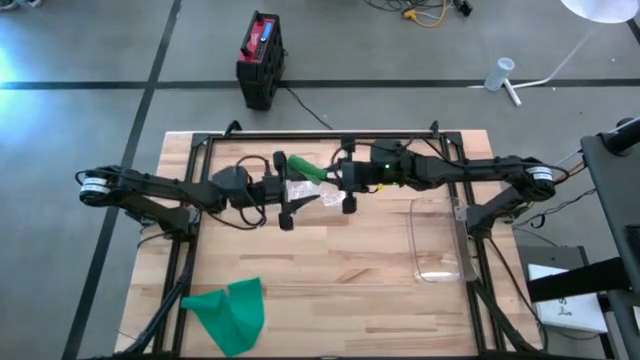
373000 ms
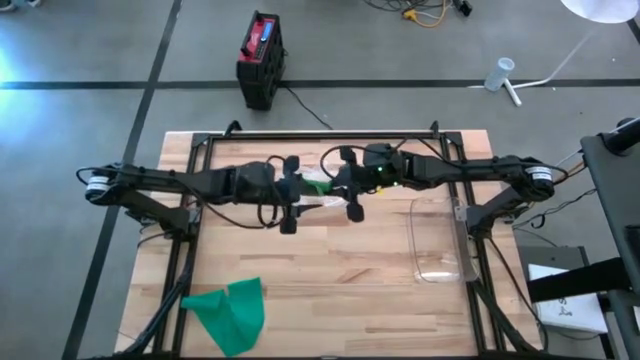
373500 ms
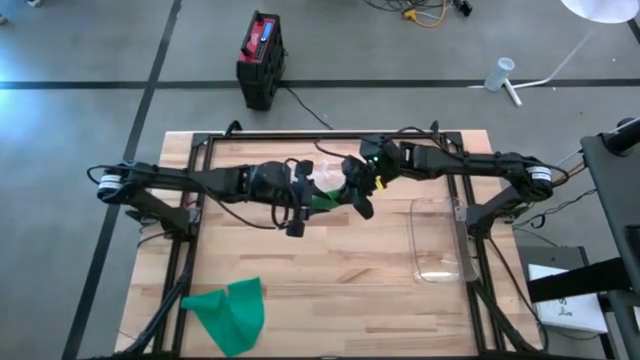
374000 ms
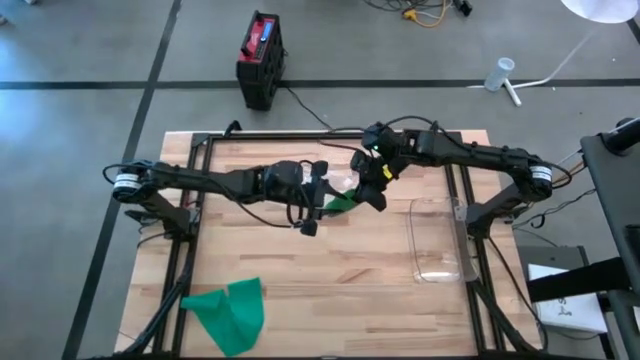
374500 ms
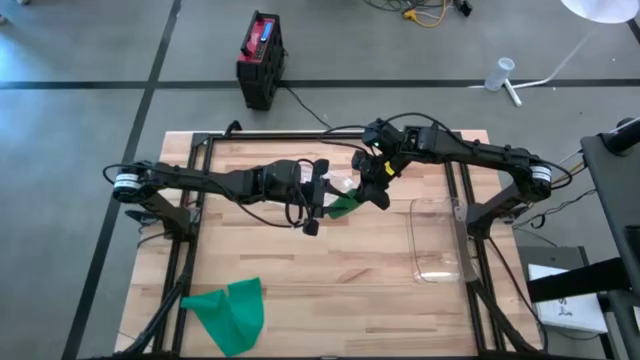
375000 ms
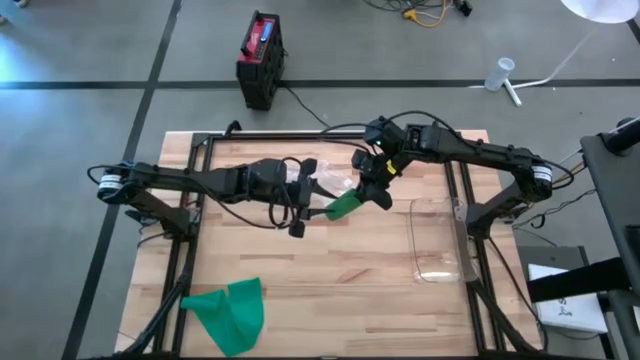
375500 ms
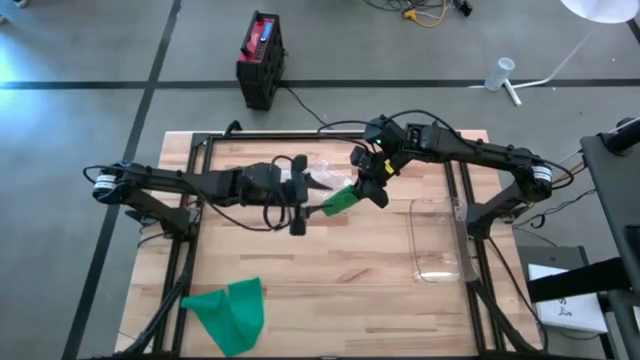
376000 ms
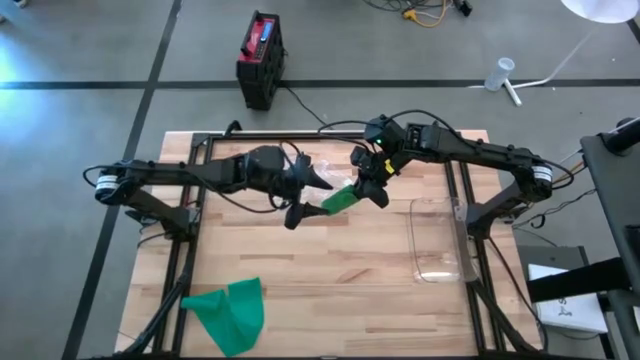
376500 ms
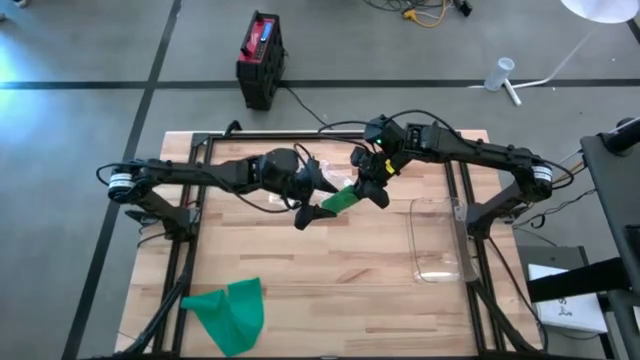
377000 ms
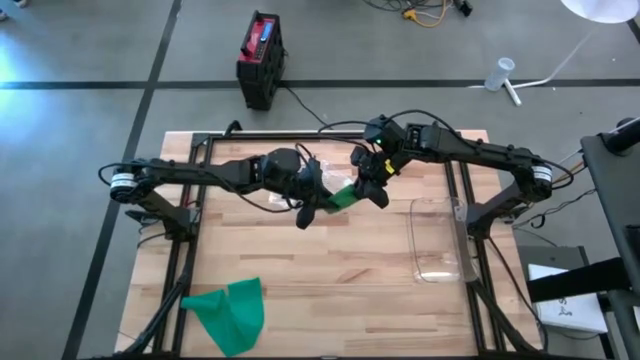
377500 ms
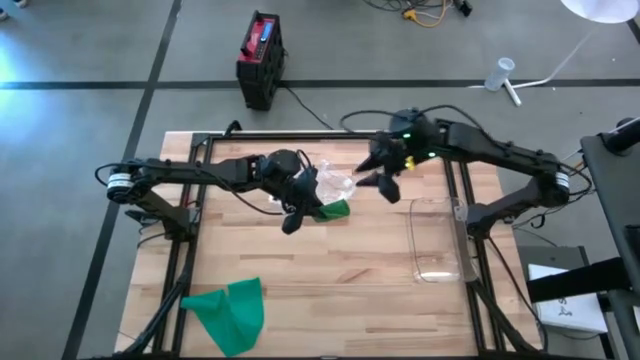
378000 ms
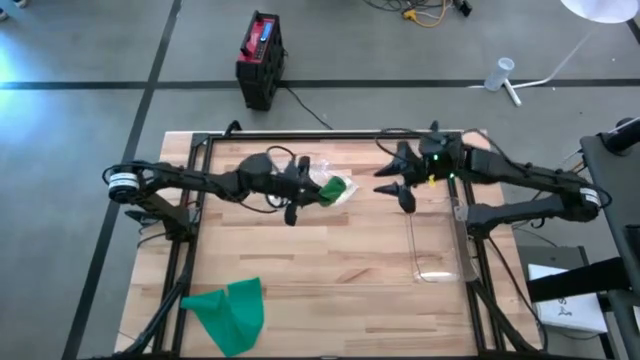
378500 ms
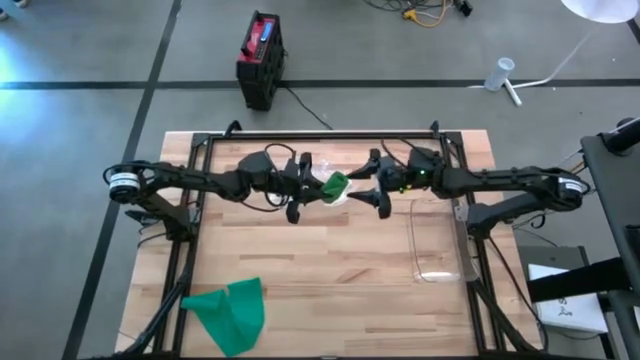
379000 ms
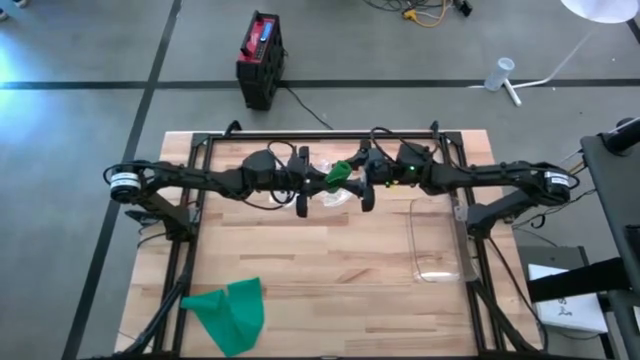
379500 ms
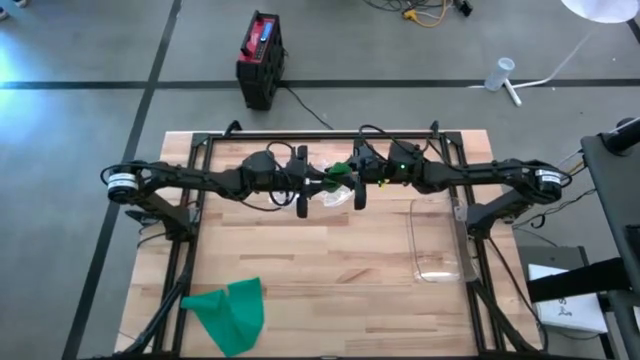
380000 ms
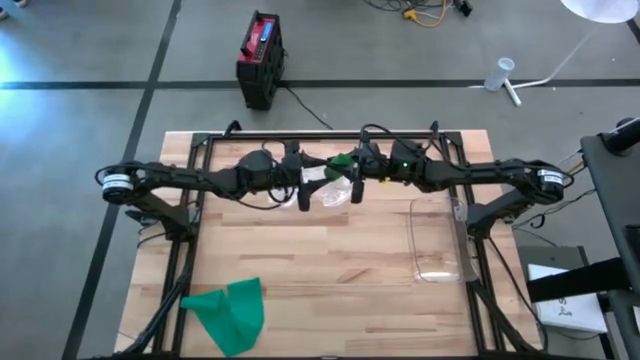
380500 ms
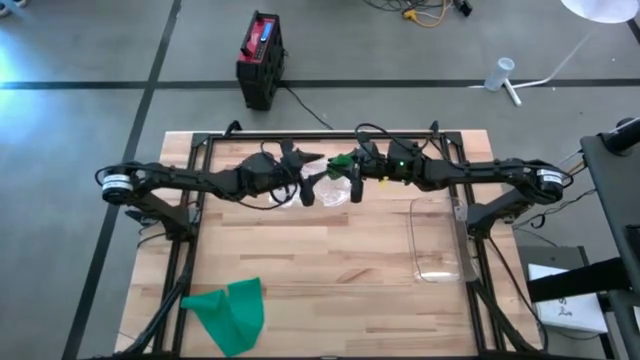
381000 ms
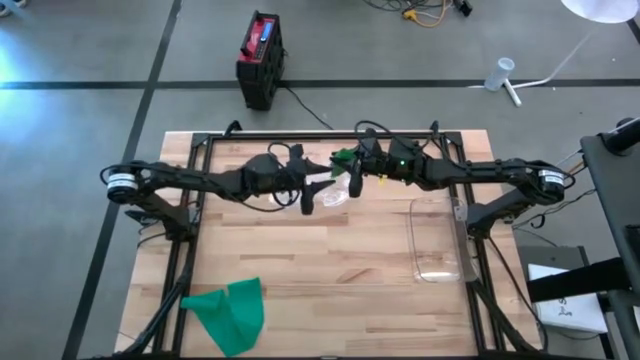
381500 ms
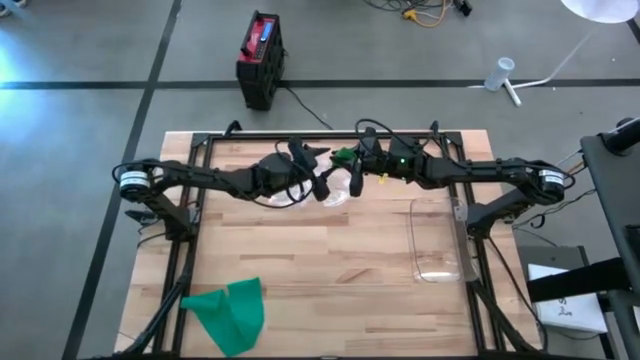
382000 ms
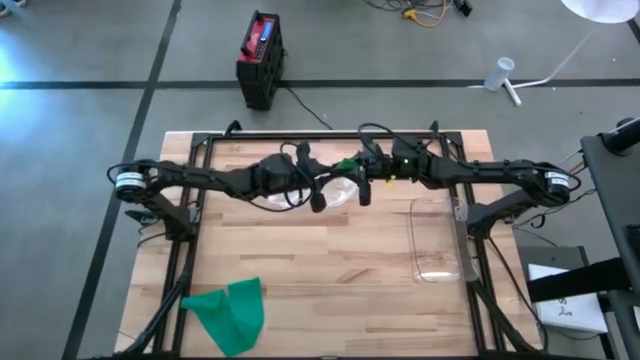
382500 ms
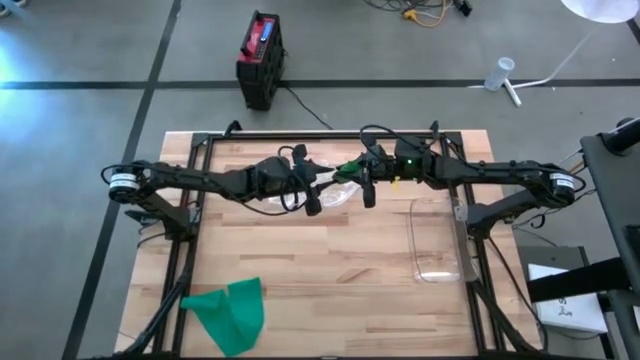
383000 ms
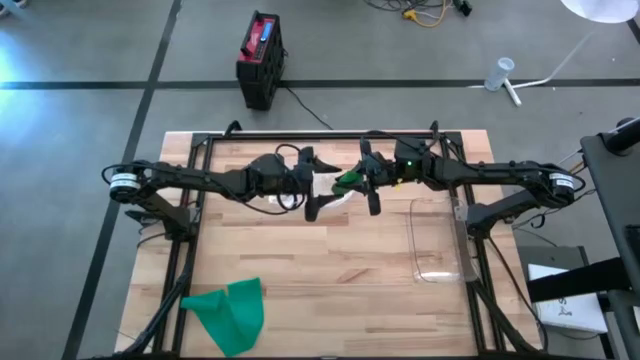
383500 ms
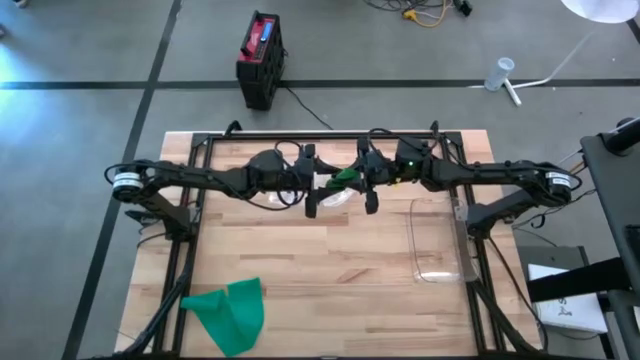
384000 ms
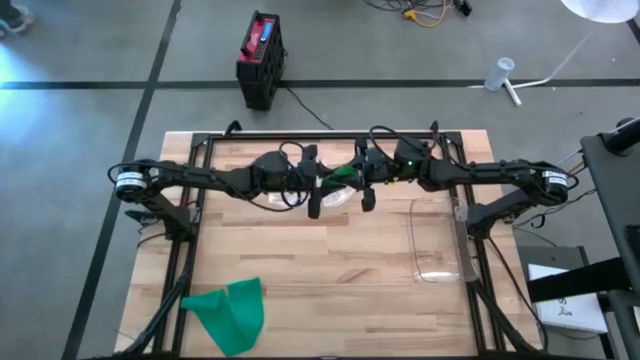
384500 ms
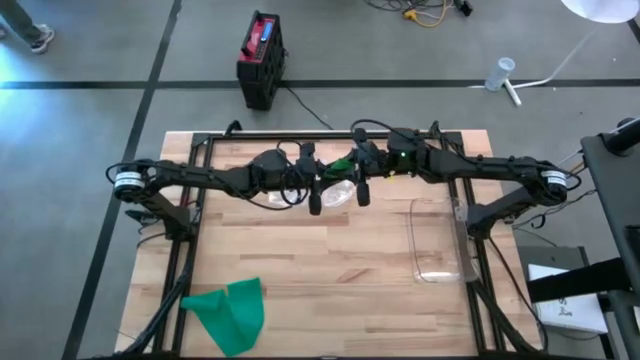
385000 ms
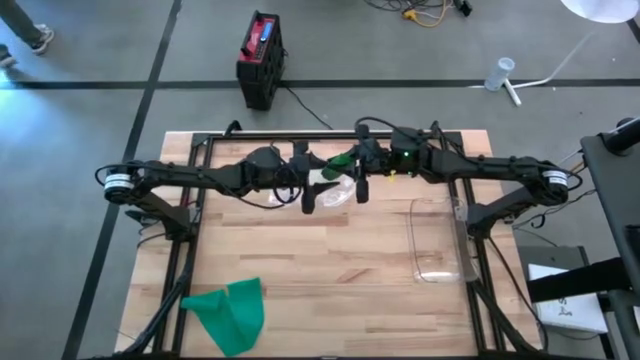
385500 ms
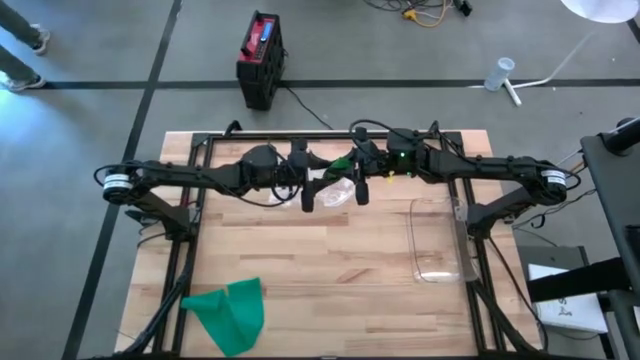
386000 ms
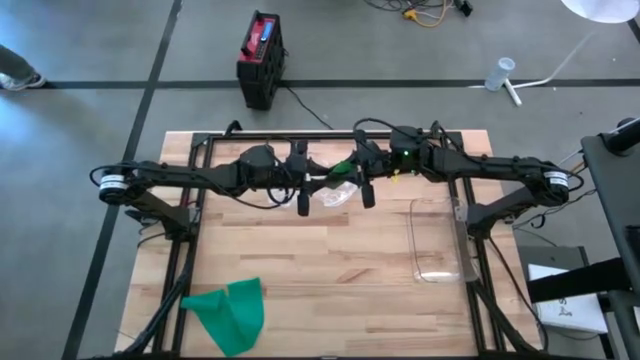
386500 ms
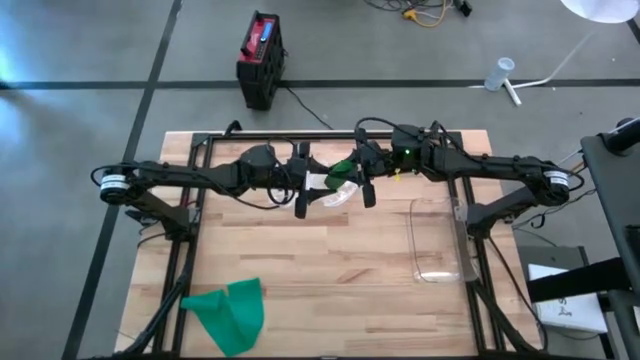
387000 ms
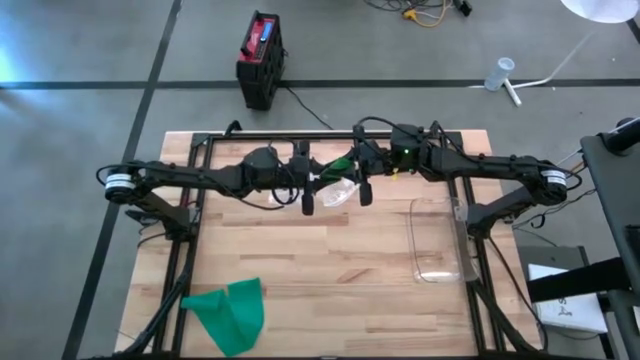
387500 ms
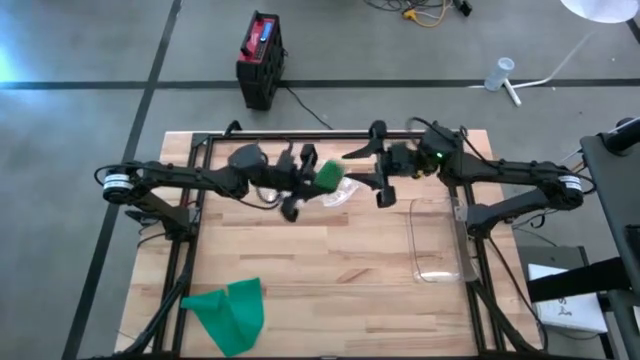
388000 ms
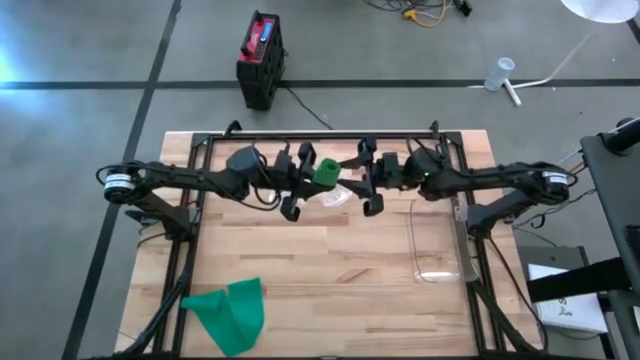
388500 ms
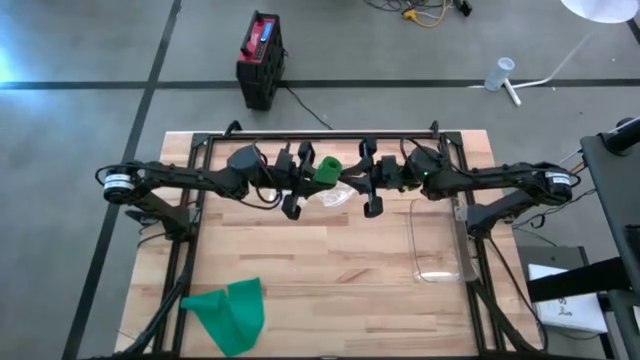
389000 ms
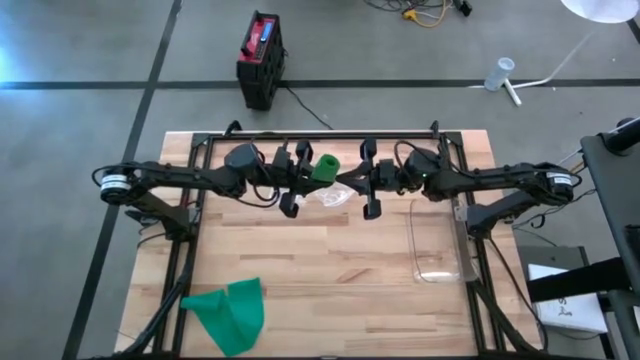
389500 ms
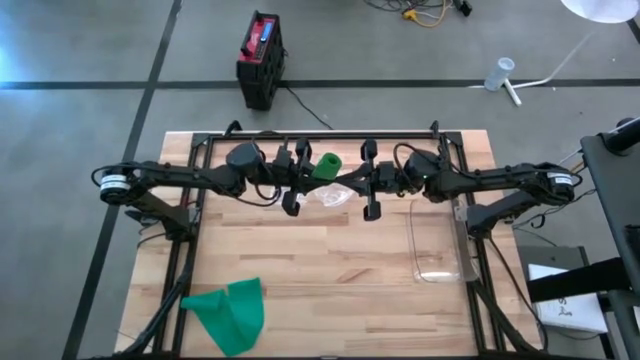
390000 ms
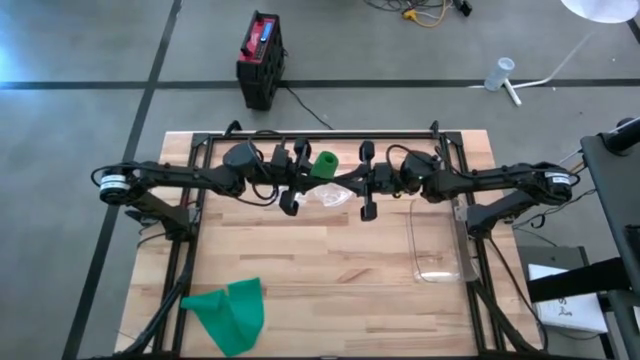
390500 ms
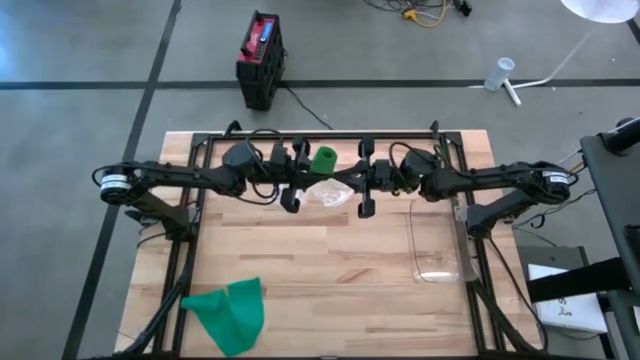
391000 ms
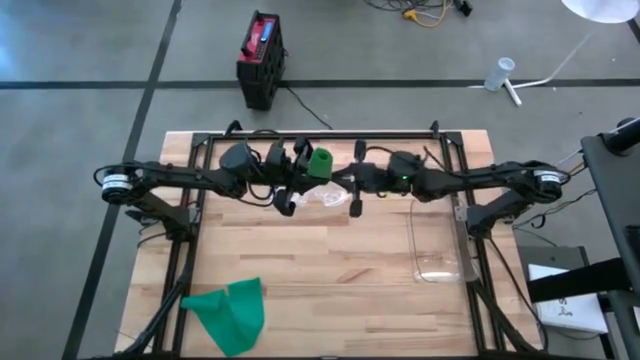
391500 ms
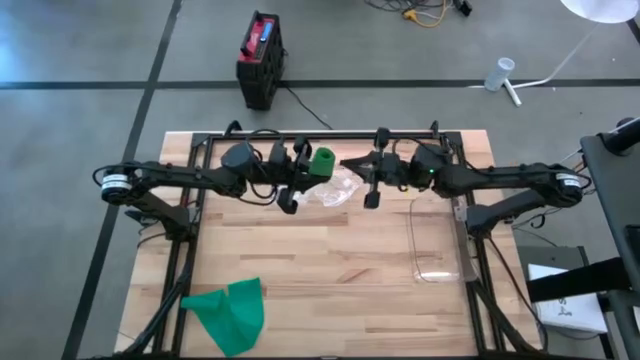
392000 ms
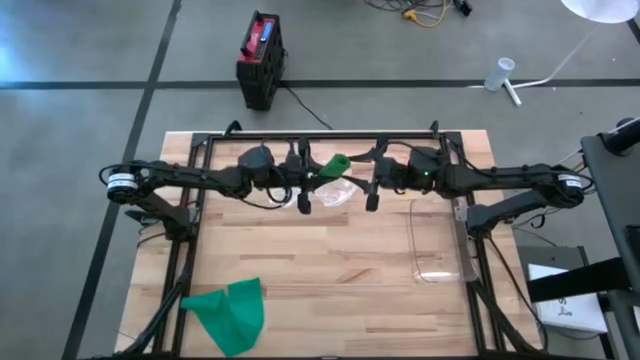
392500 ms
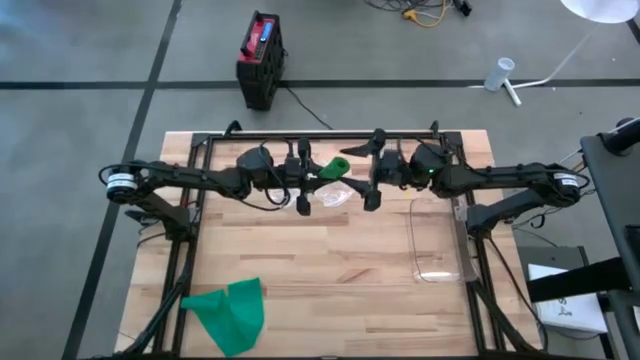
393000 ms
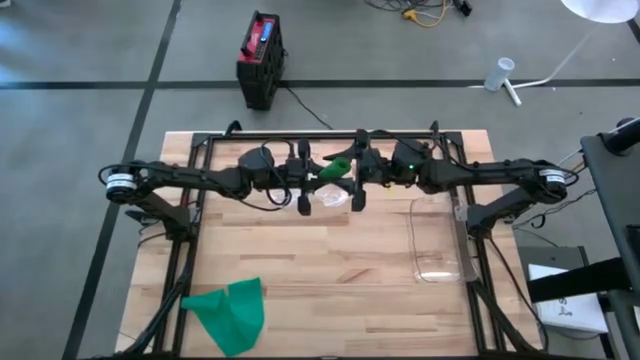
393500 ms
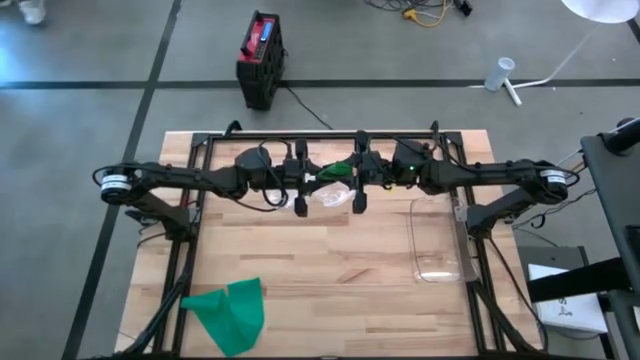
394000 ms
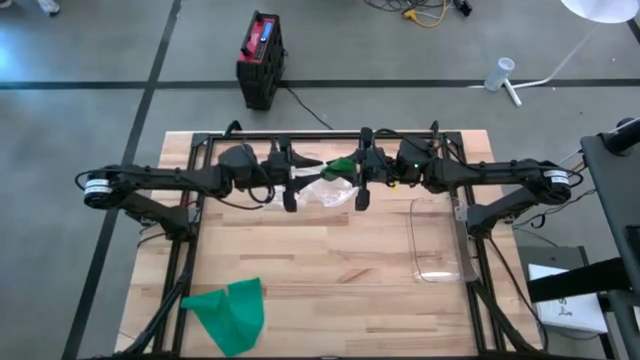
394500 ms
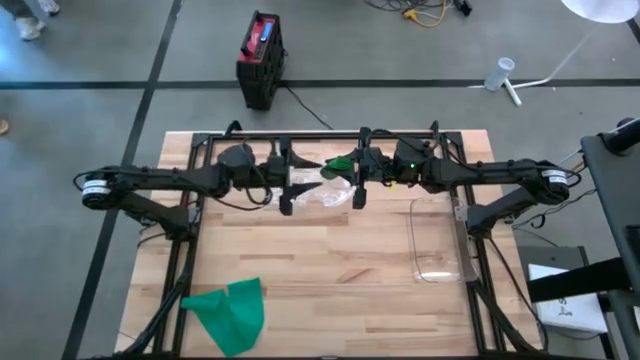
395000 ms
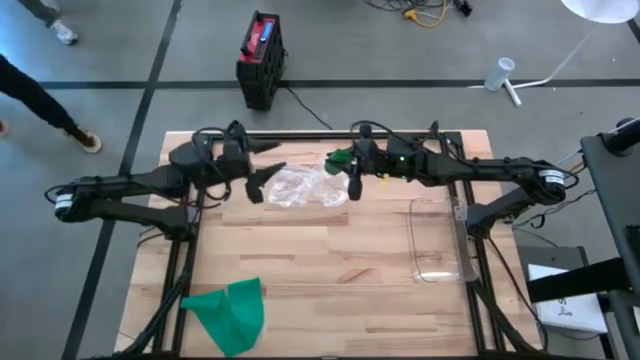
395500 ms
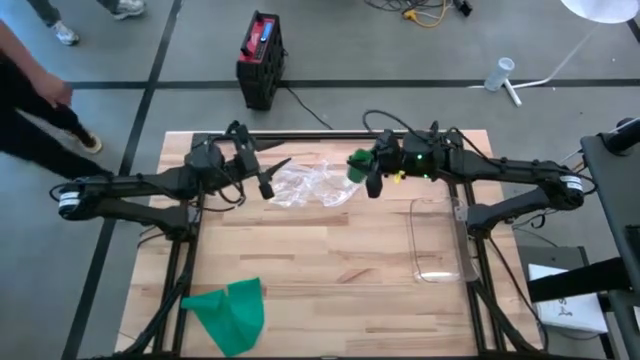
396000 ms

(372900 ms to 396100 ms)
Task: Roll bandage
Roll the green bandage
